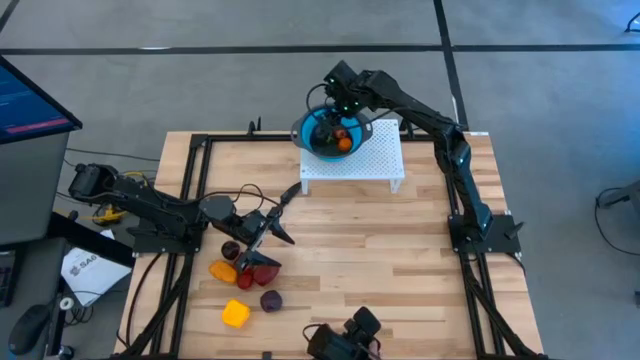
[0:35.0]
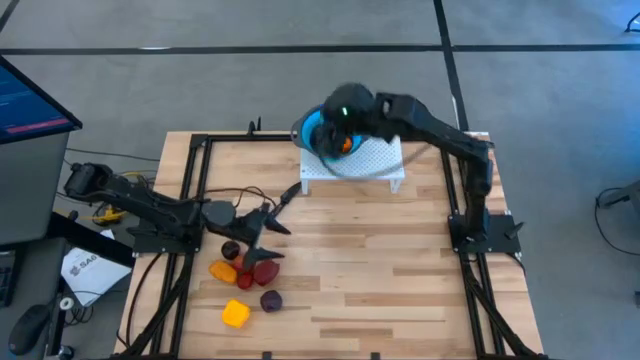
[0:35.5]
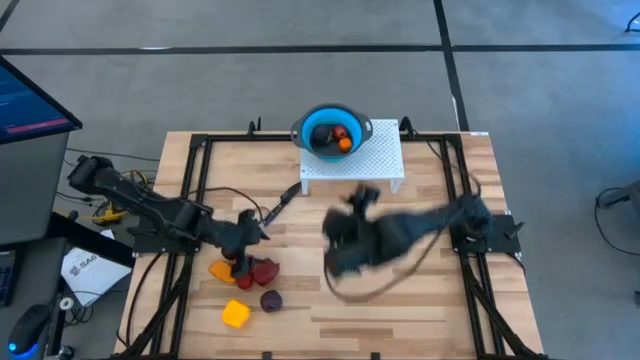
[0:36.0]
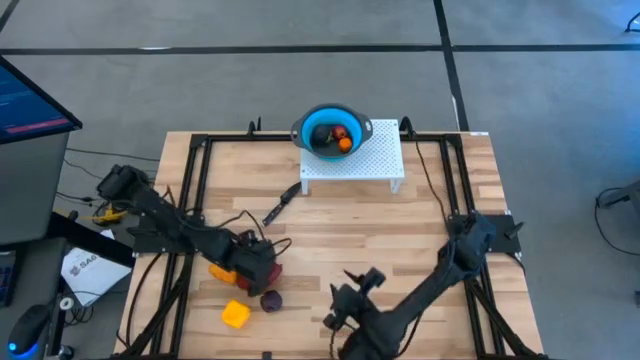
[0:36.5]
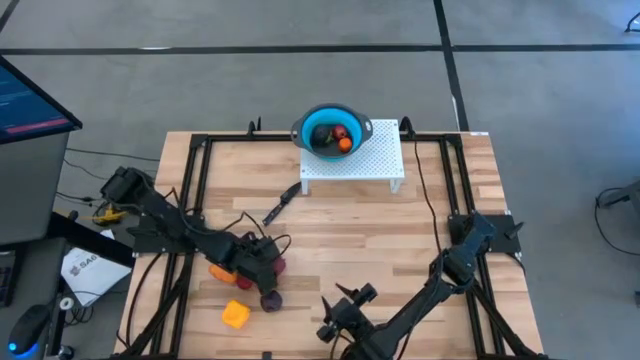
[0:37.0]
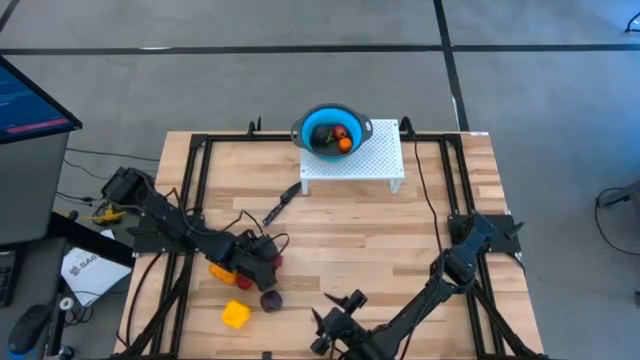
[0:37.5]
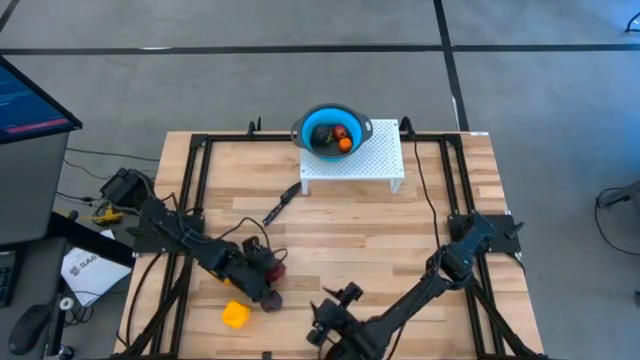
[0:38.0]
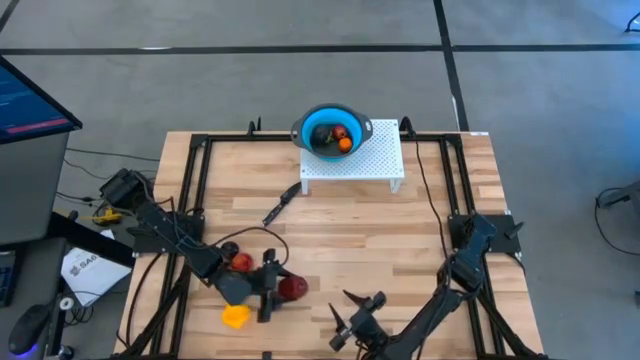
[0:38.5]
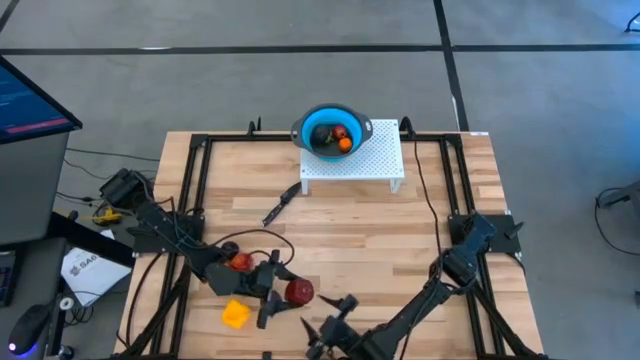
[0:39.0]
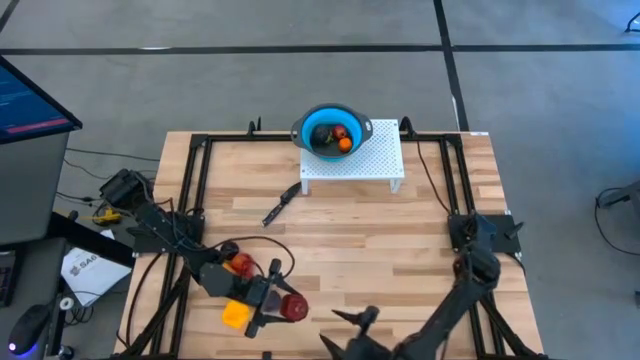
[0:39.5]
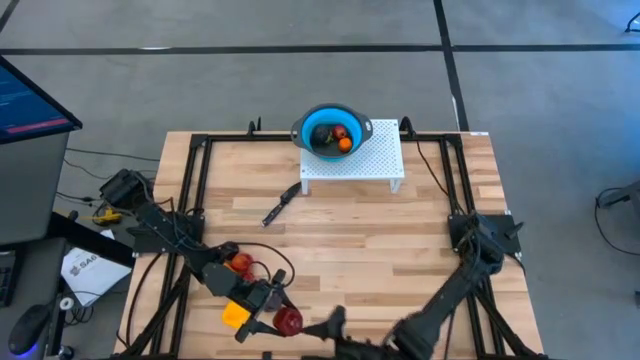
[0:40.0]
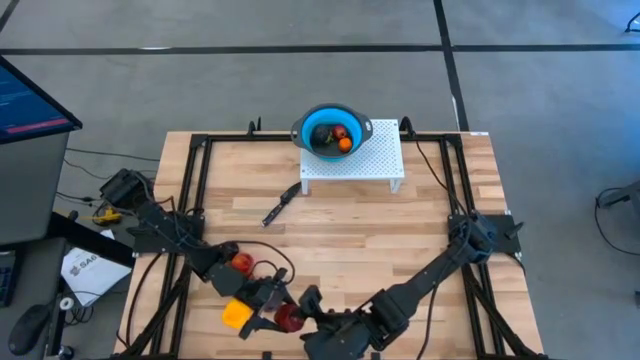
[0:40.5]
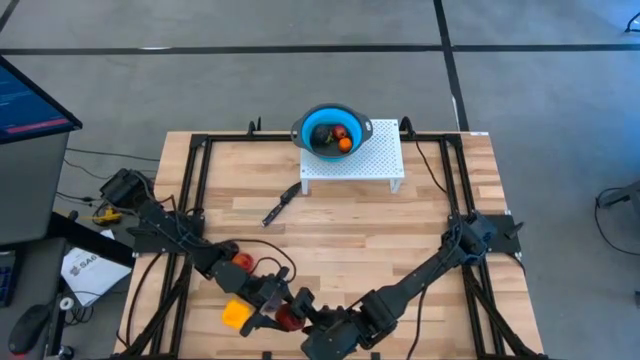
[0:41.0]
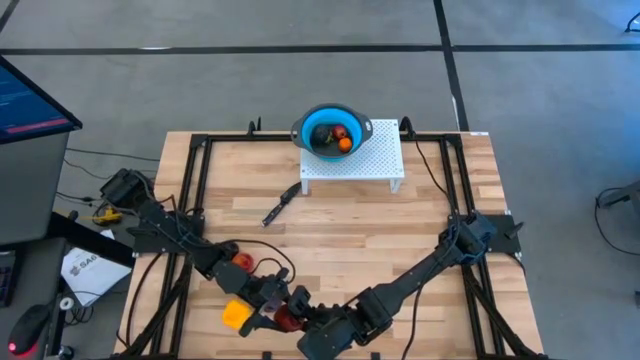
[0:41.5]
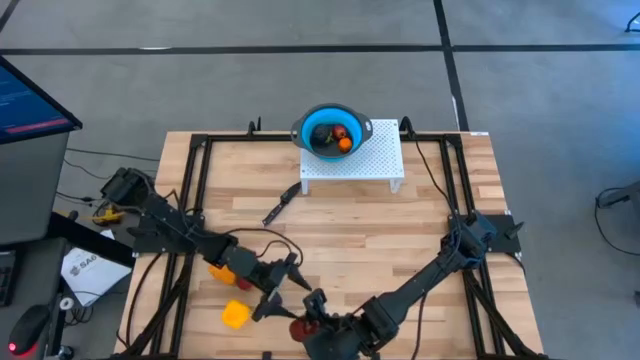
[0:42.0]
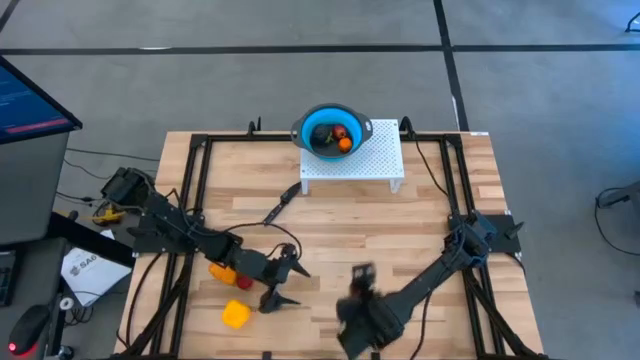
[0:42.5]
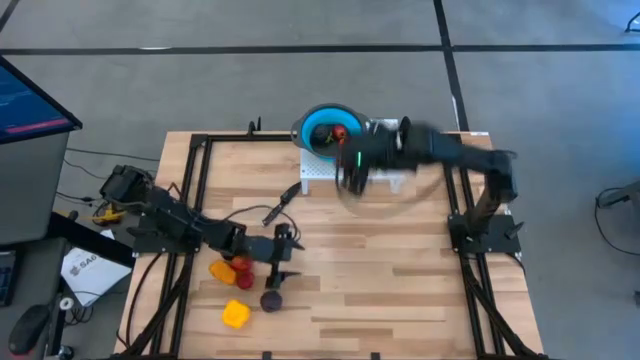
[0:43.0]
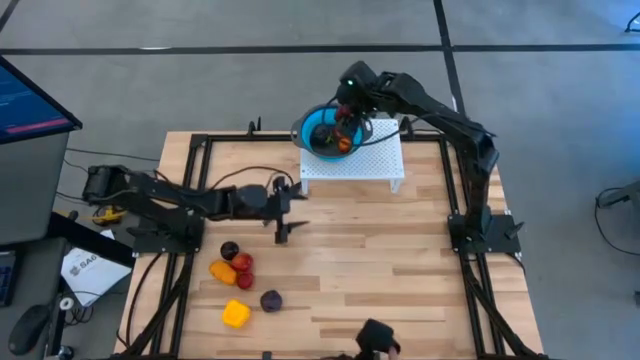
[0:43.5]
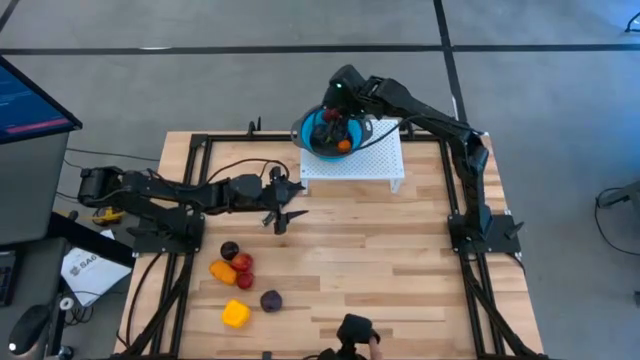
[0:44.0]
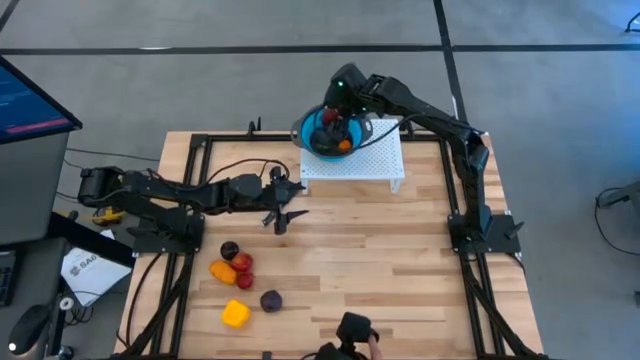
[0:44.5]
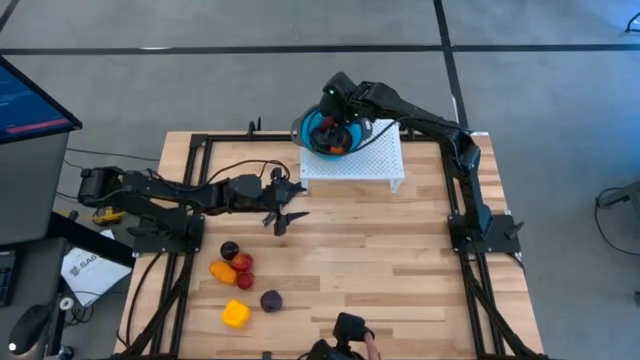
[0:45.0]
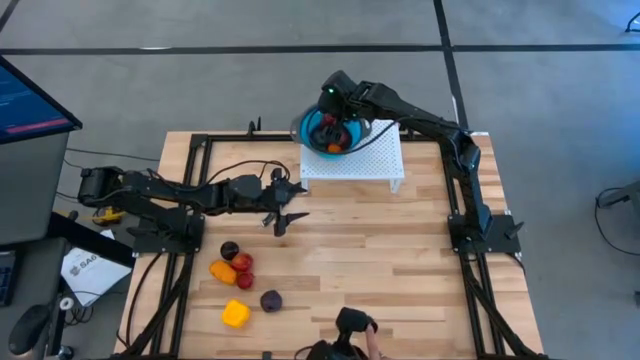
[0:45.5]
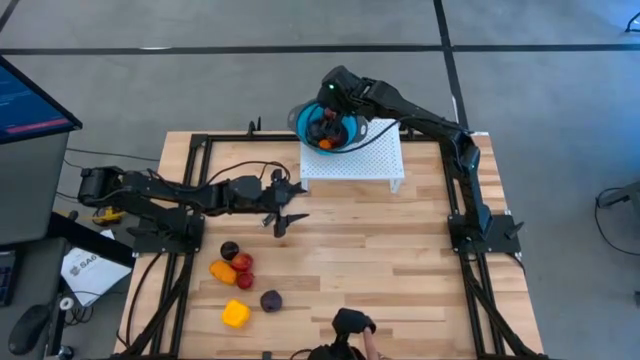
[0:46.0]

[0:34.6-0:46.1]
Task: Pick & Place Fruit
Put the red apple into the blue strainer bowl on the shelf

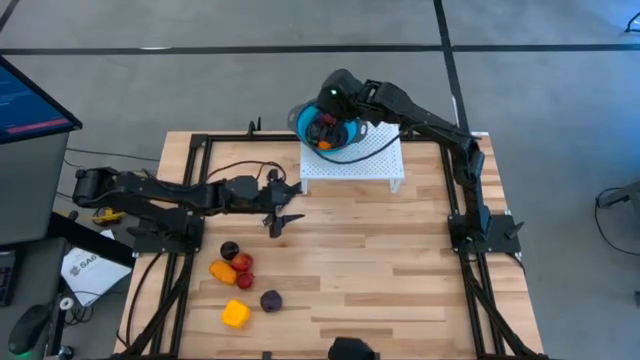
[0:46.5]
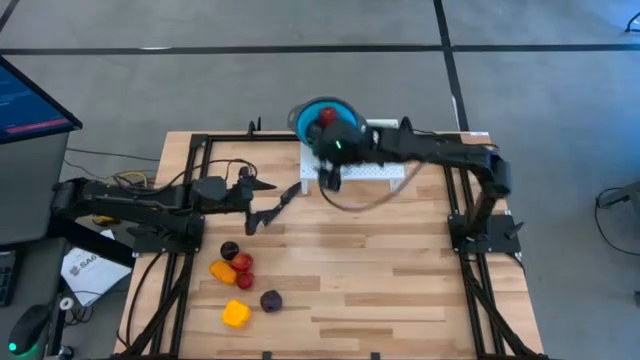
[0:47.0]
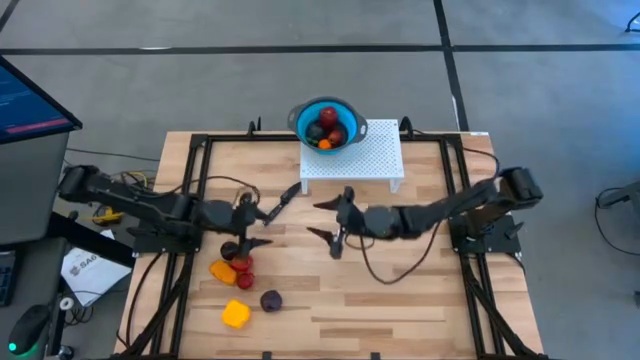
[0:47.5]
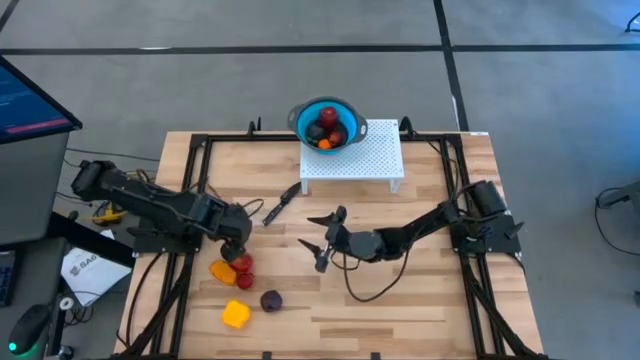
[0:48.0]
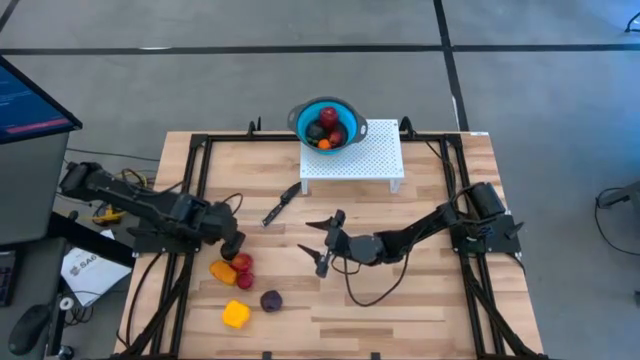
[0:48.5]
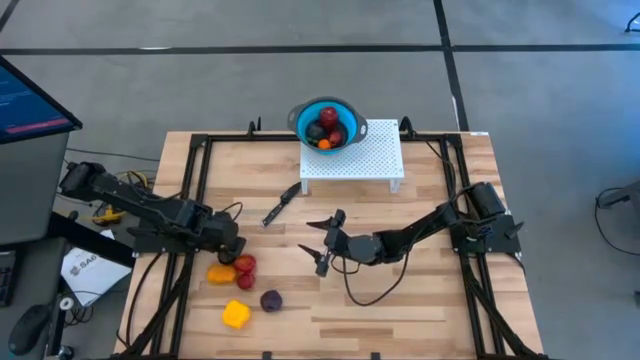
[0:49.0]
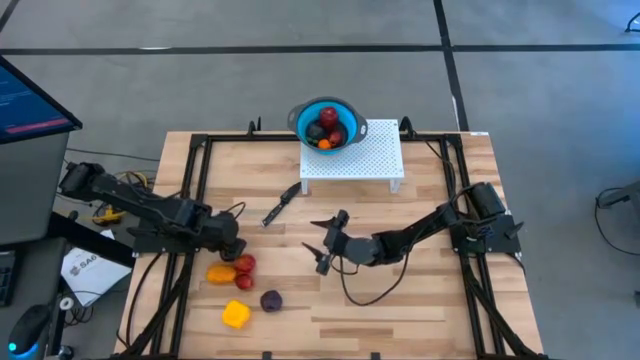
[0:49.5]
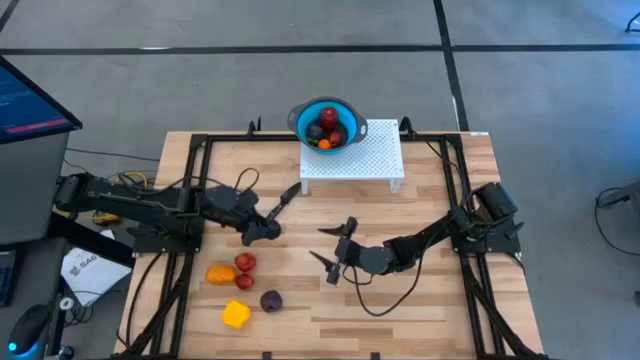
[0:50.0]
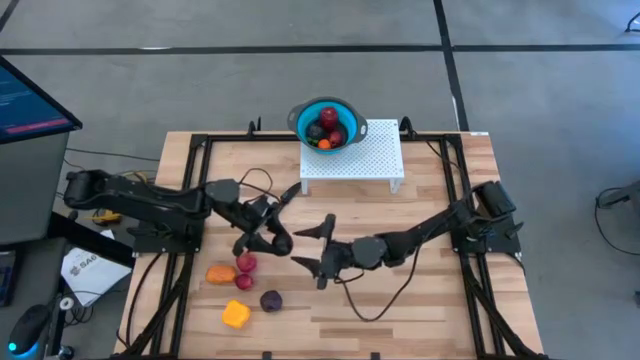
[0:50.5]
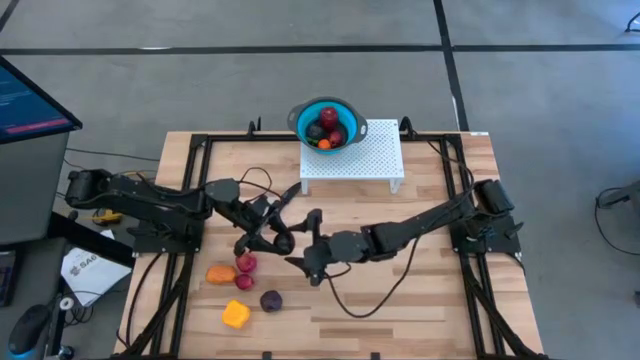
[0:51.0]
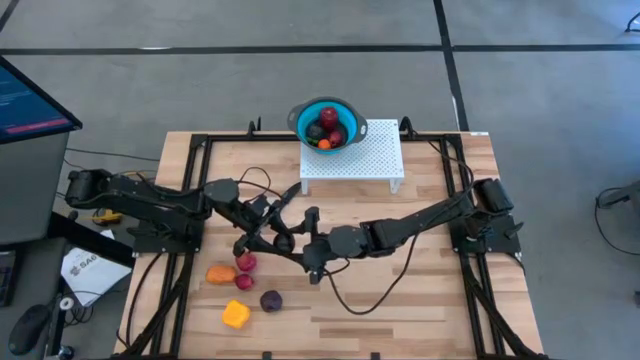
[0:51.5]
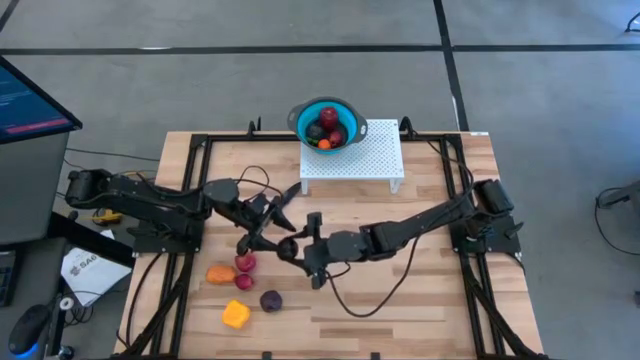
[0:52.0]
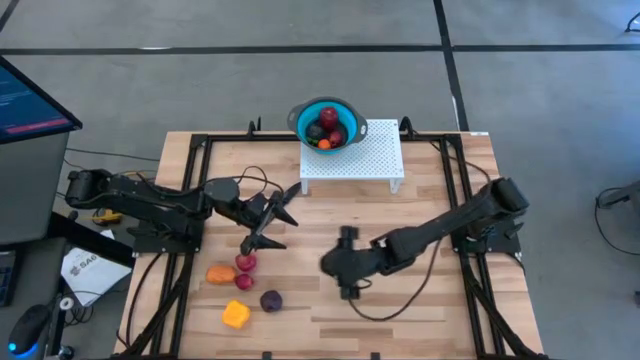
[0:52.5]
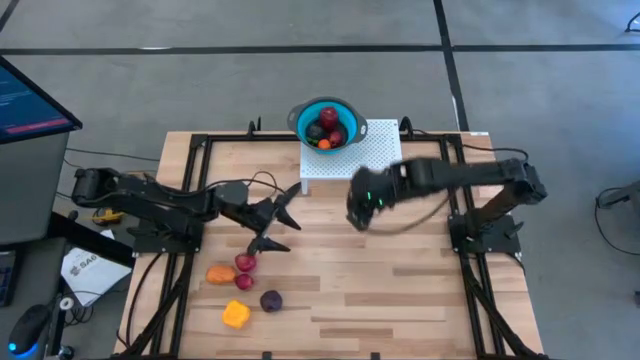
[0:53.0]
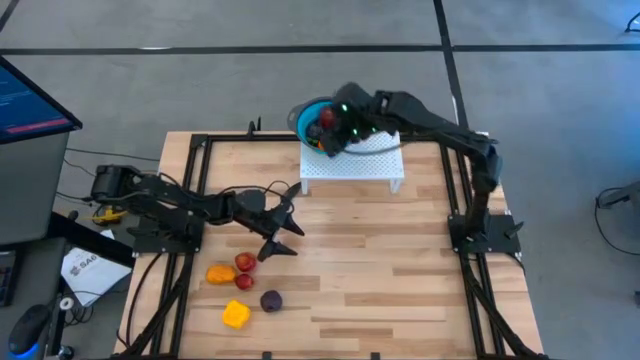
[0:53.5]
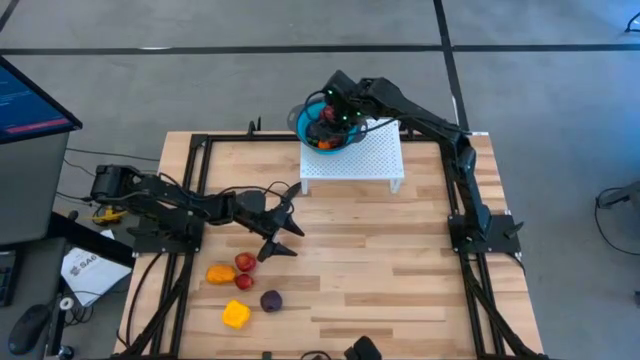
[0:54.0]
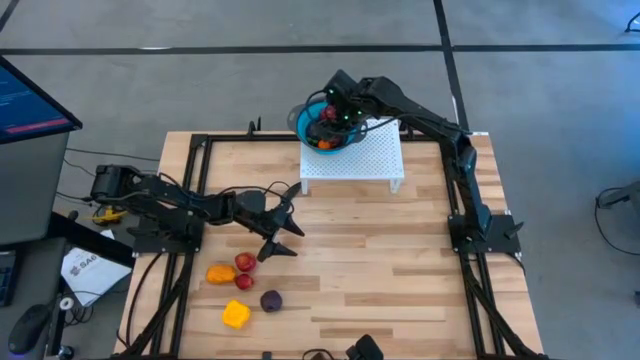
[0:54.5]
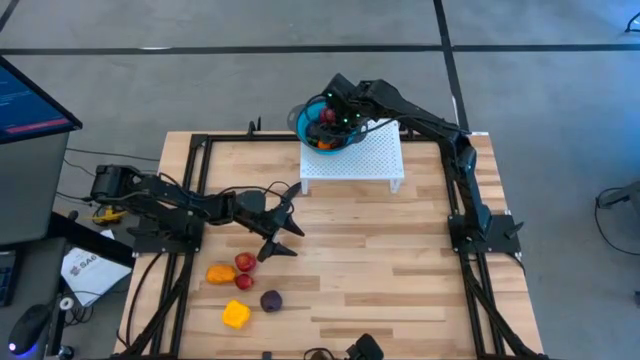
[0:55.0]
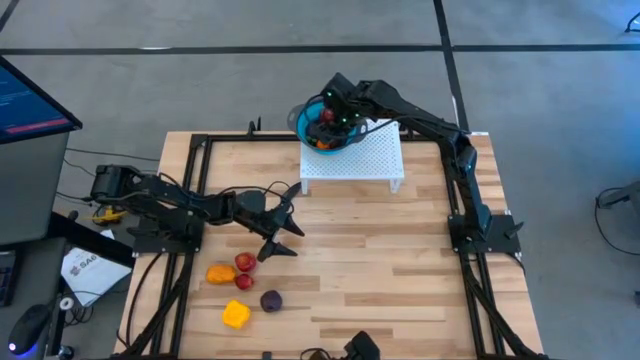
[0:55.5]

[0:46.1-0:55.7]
Put the black plum into the blue strainer bowl on the shelf

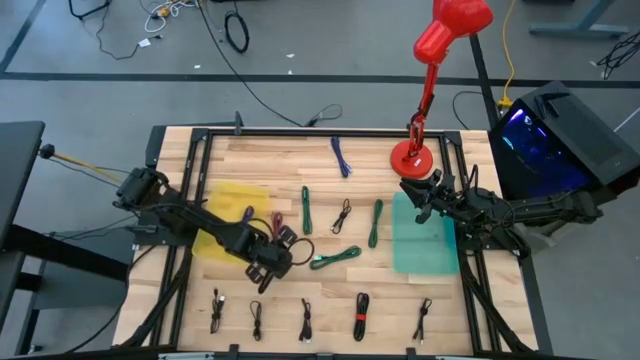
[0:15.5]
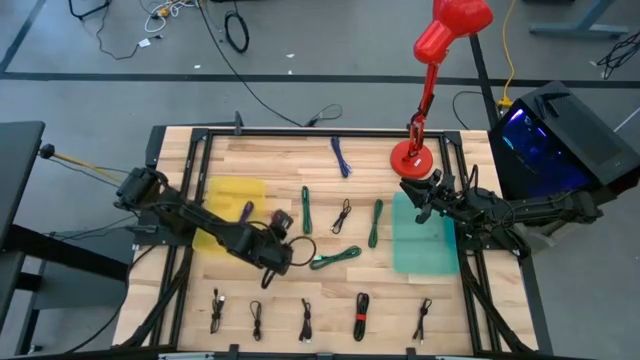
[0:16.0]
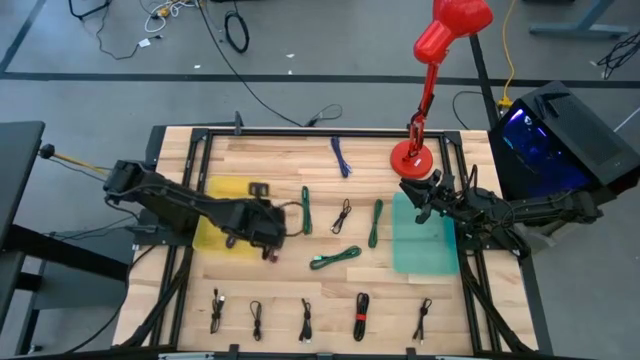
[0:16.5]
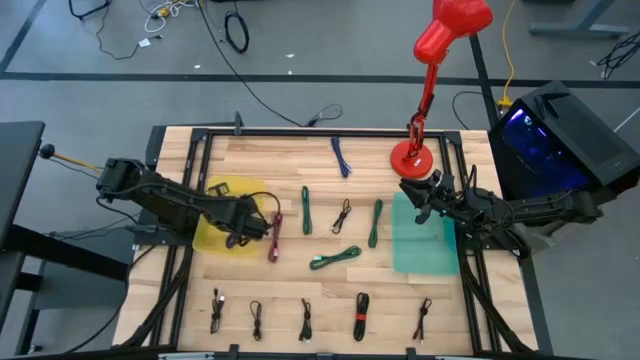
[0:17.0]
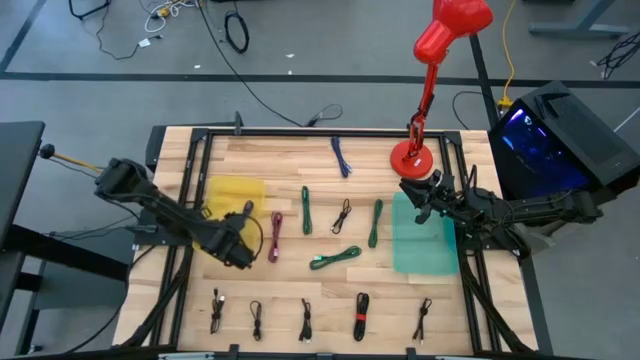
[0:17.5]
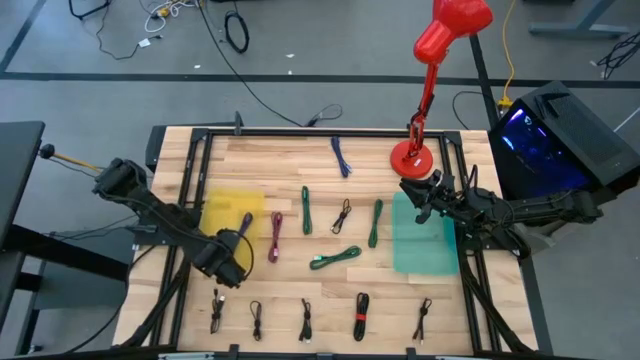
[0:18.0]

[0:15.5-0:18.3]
Task: Pick & Place USB Port
Adjust the yellow bin
